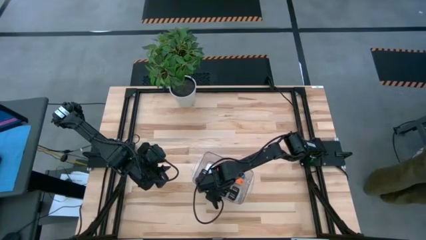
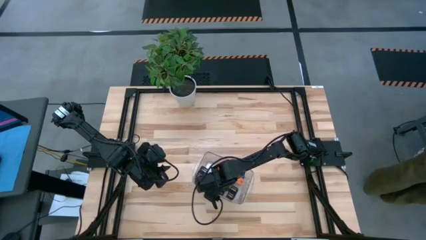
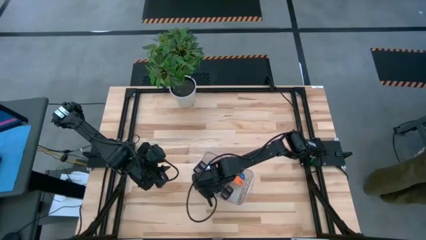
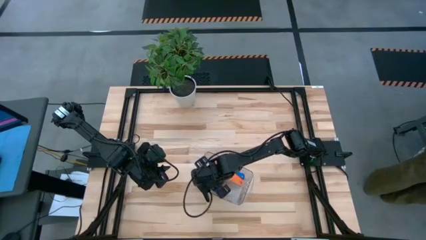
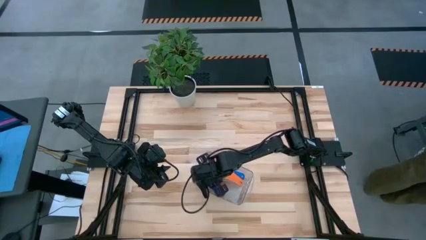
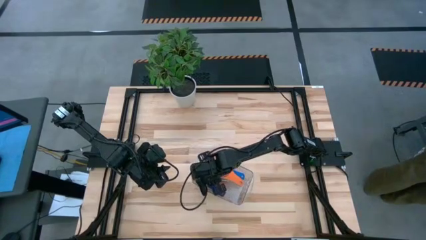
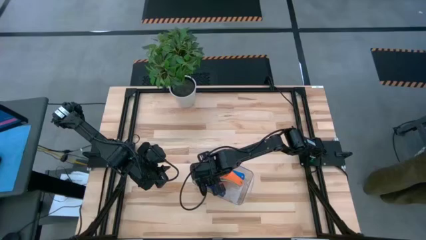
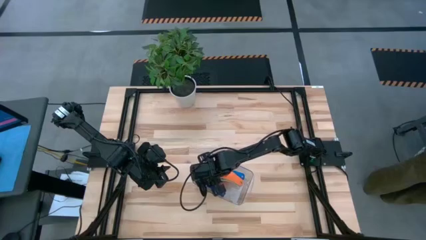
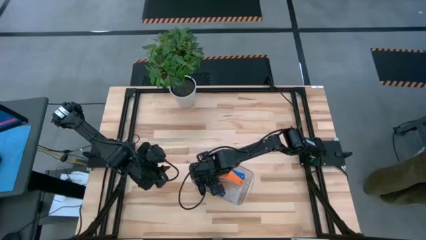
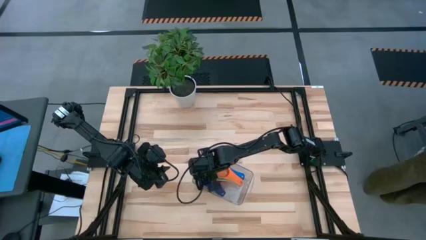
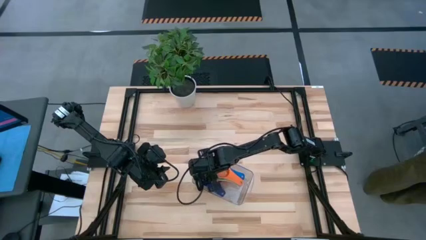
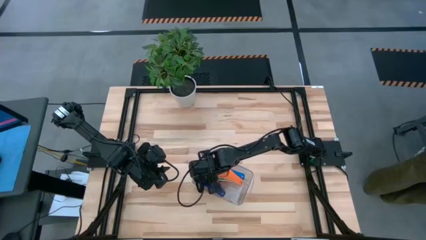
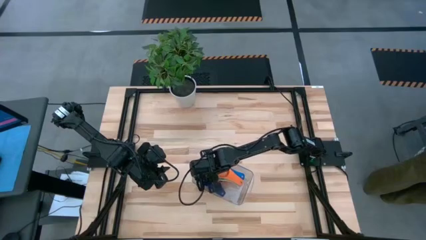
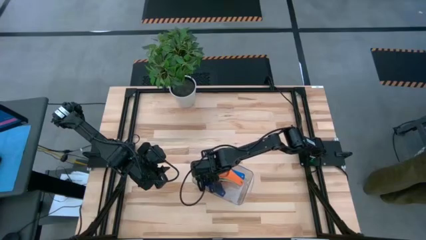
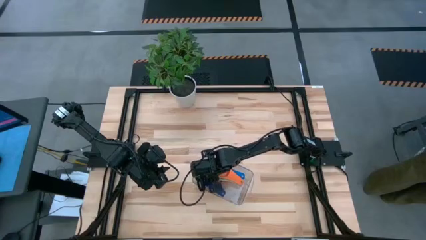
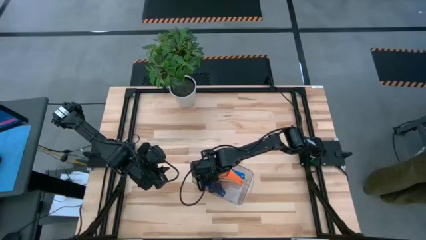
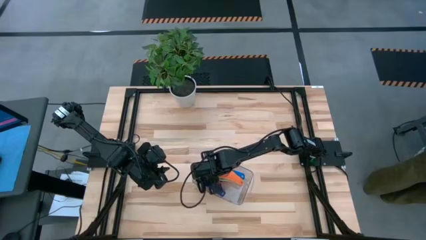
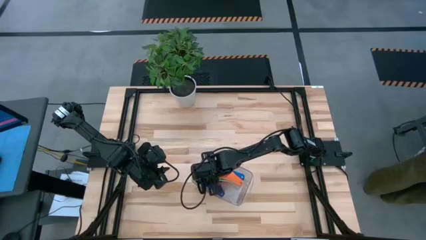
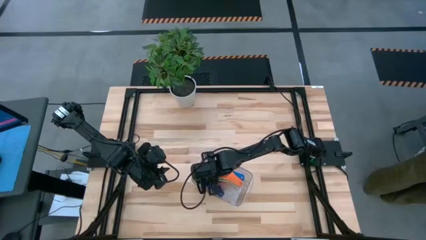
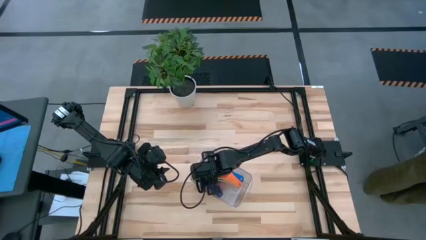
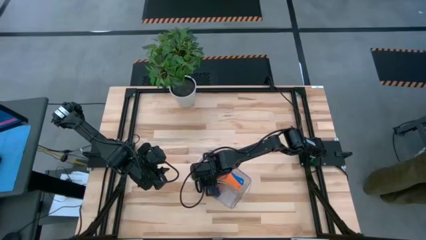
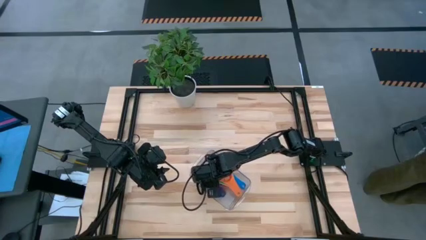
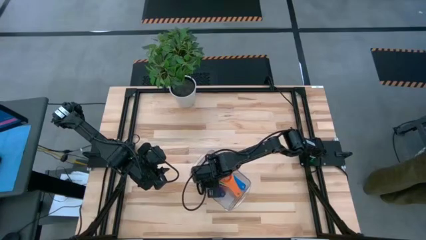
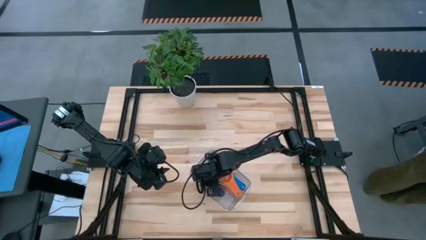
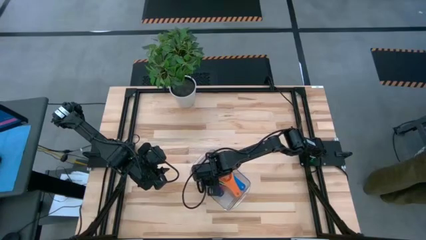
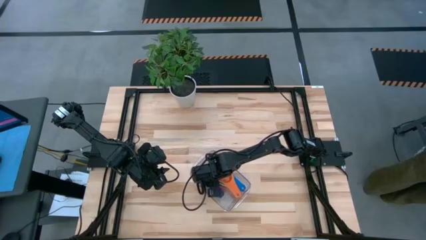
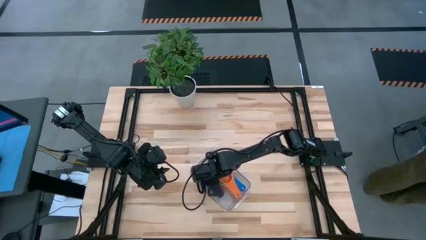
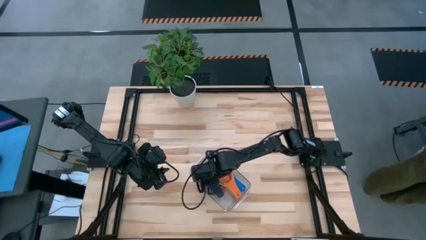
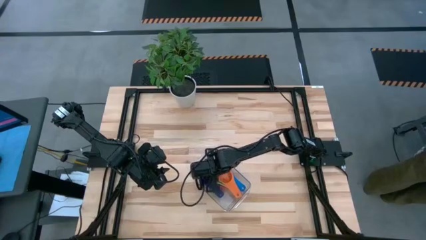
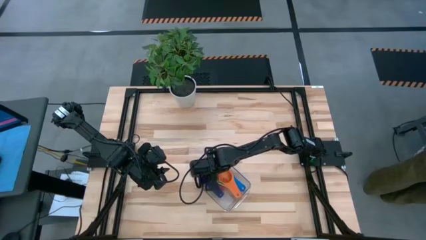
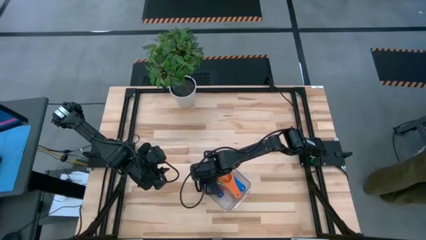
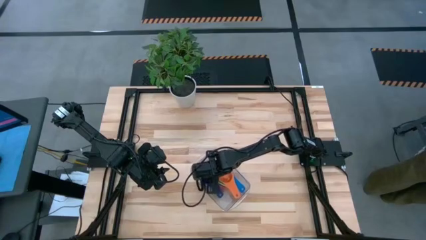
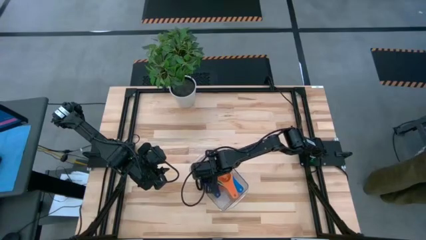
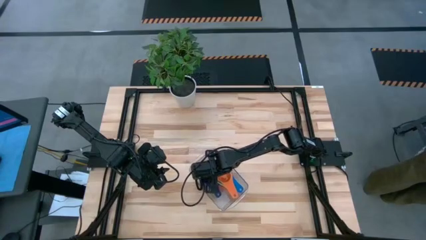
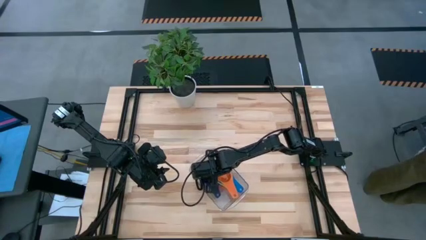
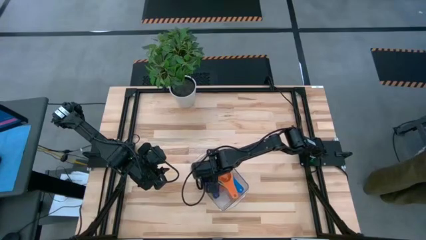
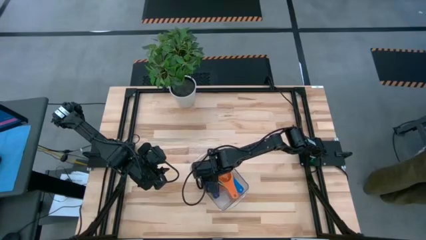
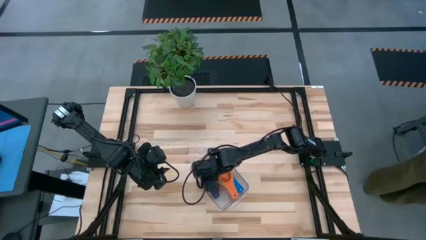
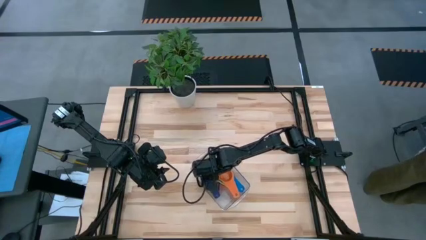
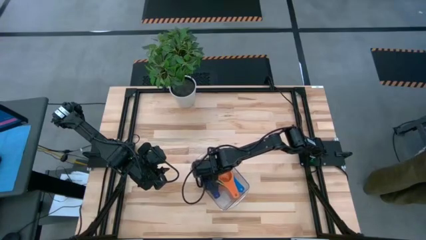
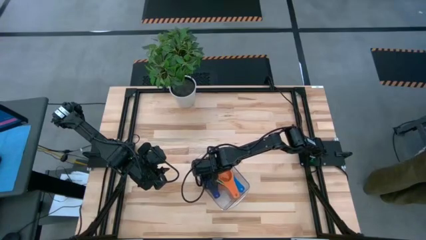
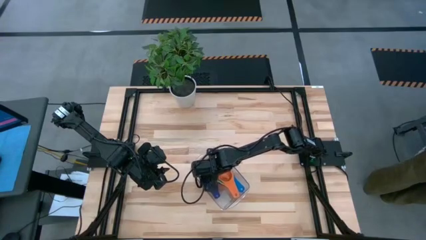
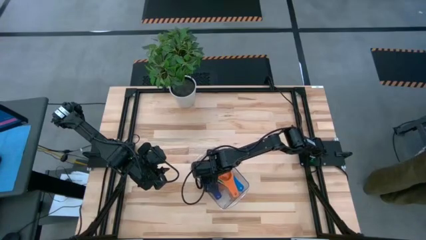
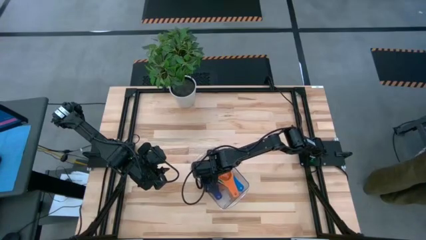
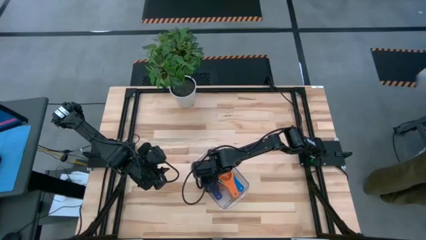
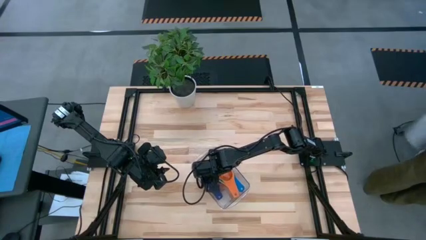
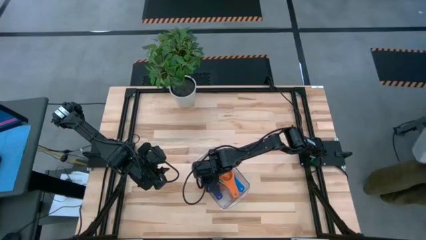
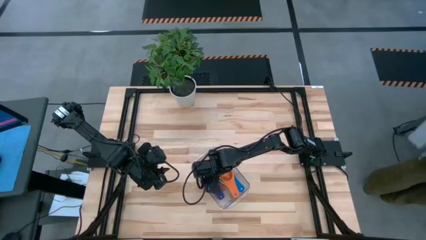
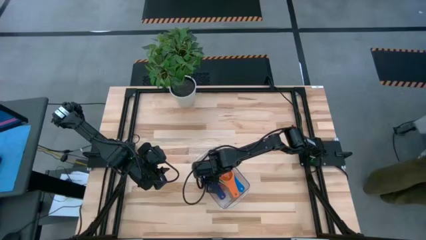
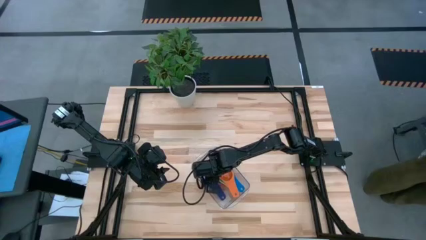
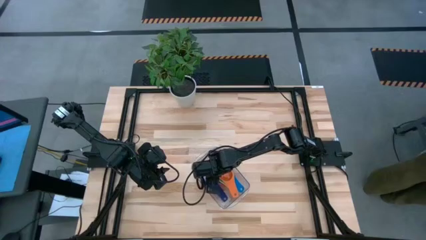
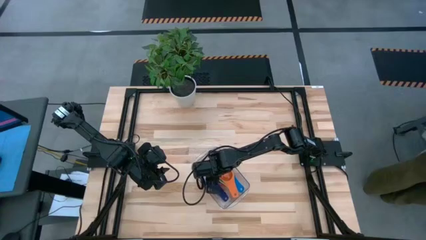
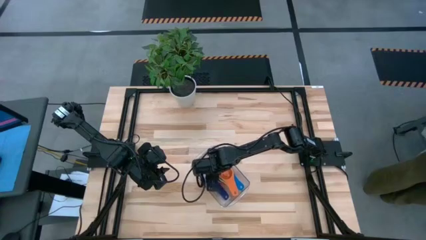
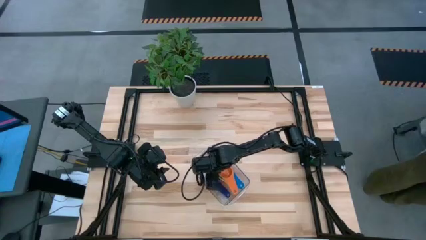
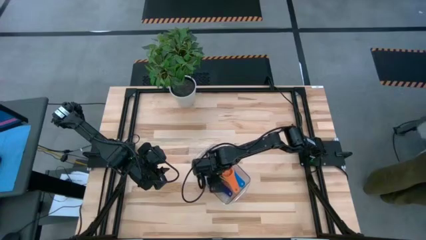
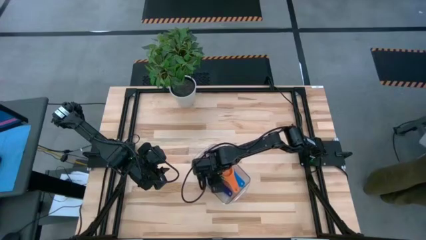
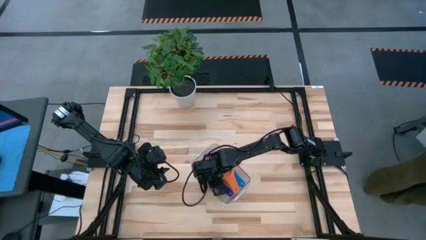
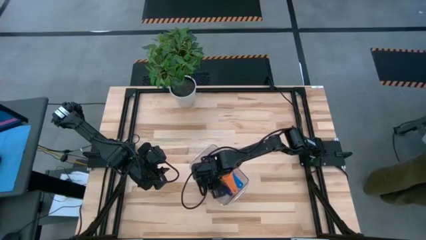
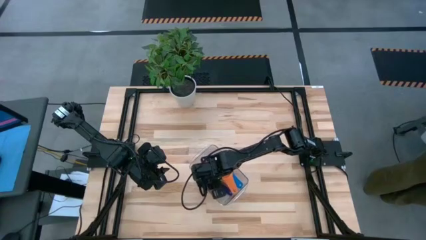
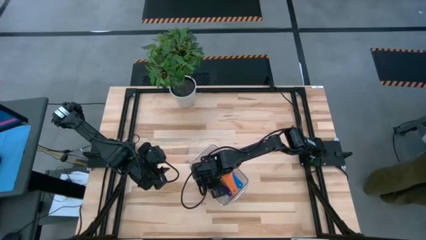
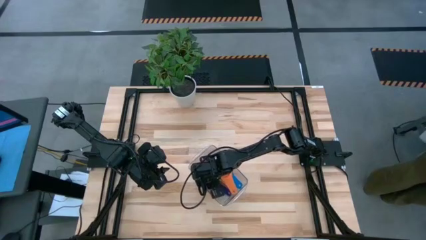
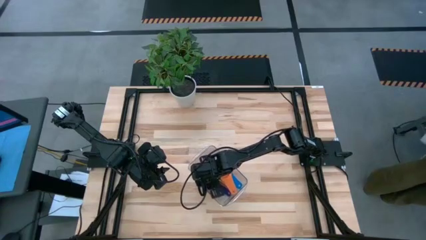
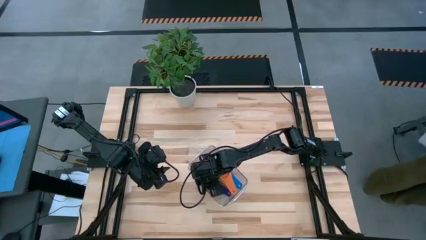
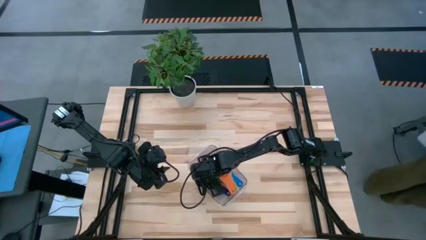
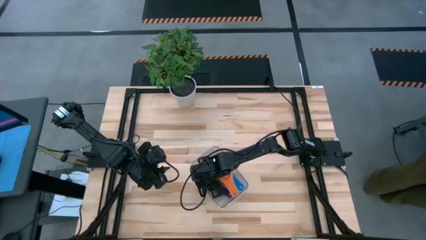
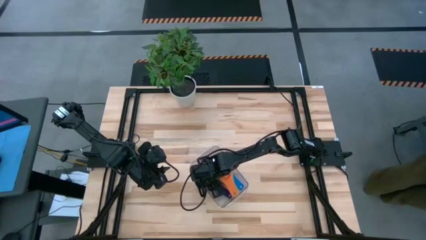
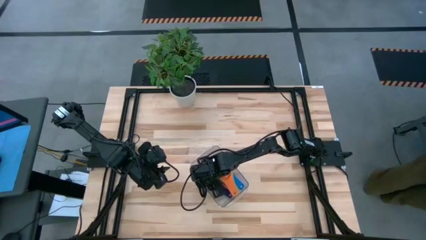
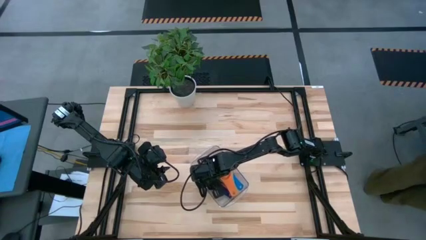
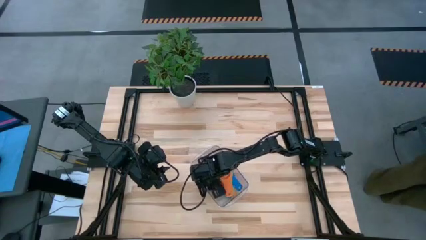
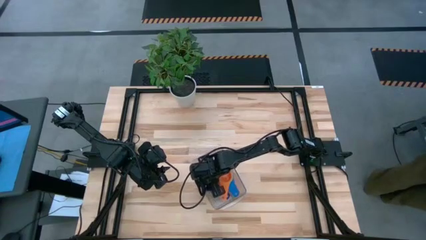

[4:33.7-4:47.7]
Task: Nest measuring cups in basket
Stack the dark blue measuring cup on top of the orange measuring cup

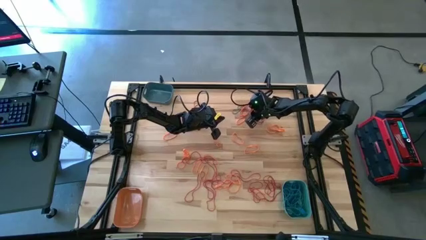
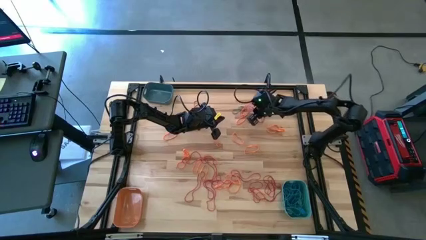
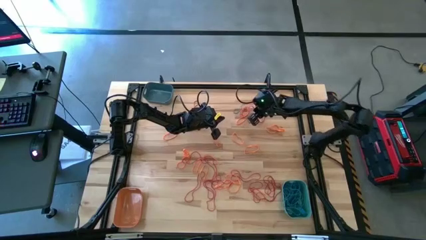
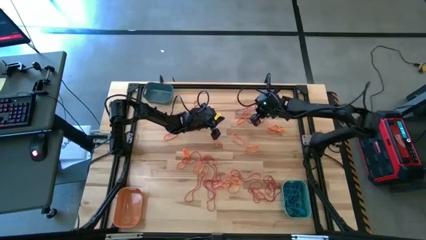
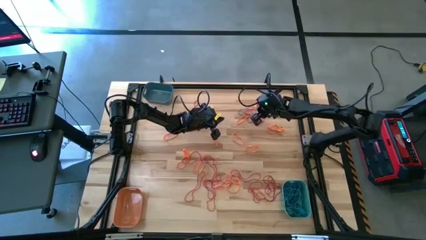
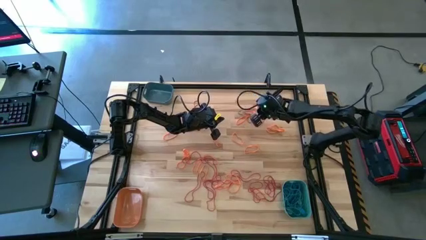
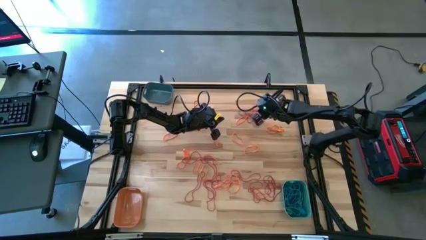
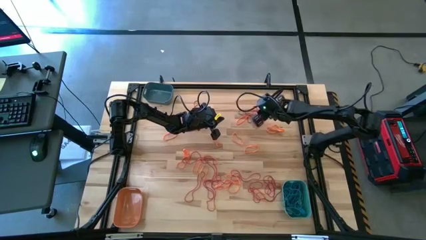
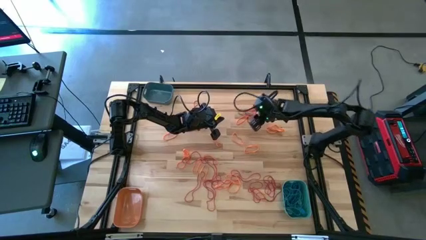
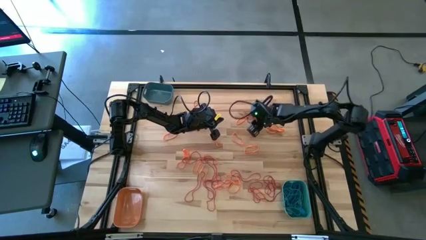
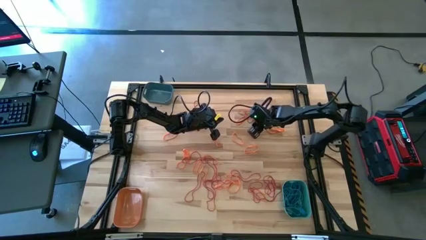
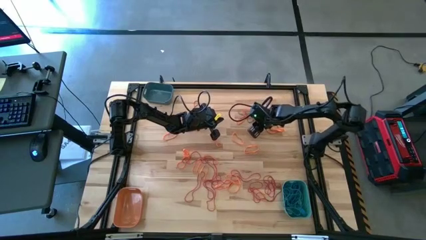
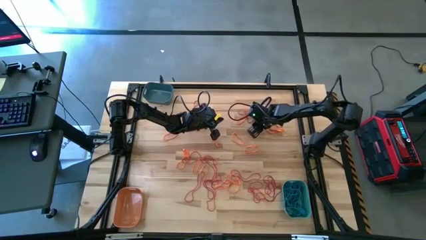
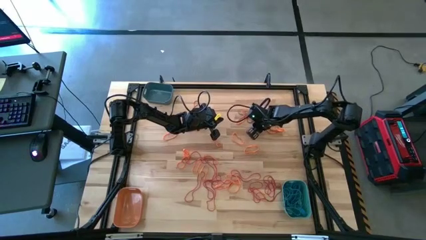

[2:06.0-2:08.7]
Task: Sort rubber bands into baskets
Put the blue rubber band into the light blue bin
